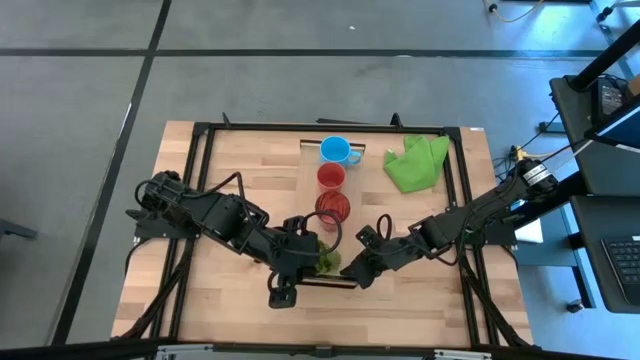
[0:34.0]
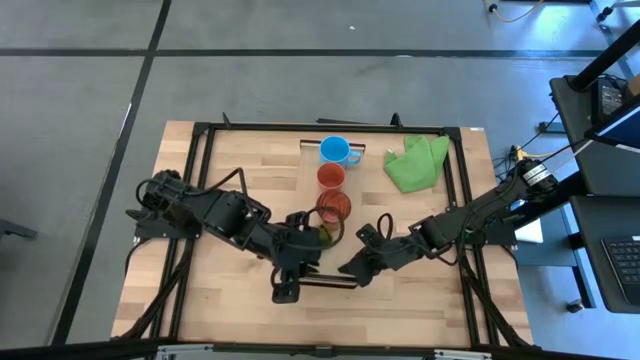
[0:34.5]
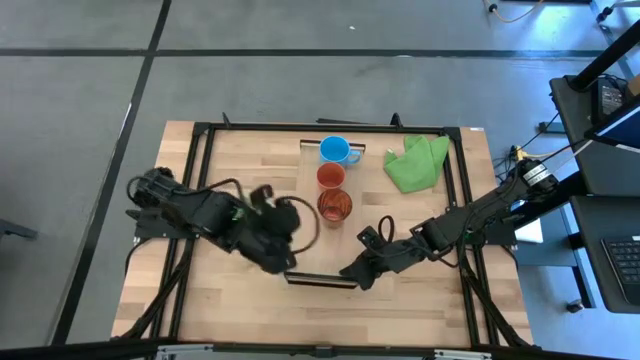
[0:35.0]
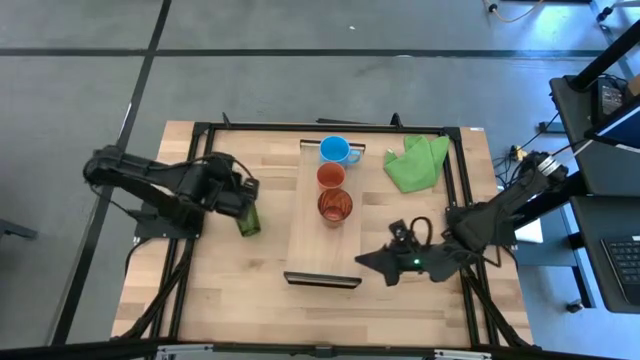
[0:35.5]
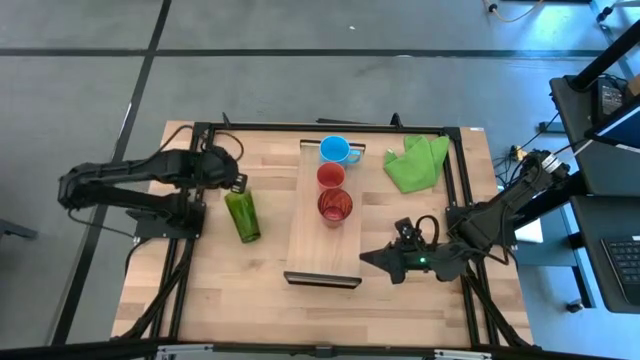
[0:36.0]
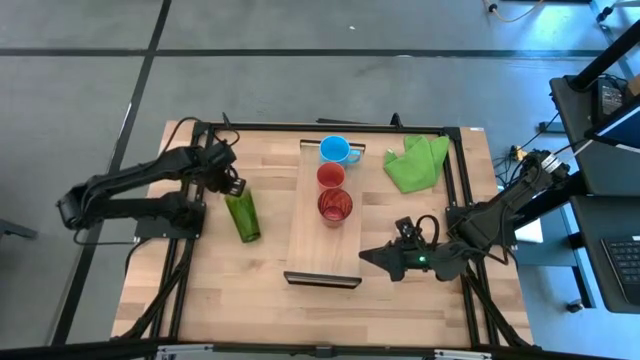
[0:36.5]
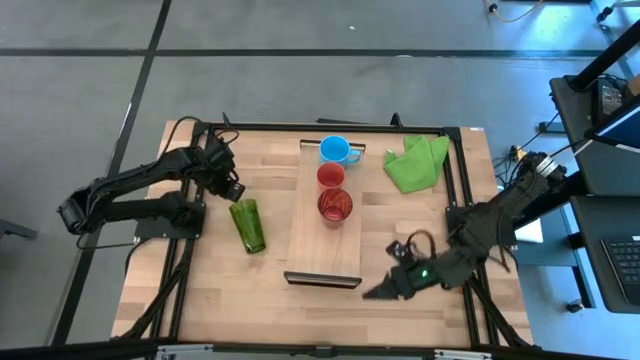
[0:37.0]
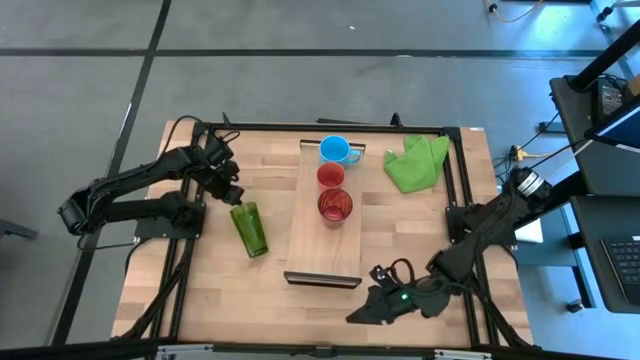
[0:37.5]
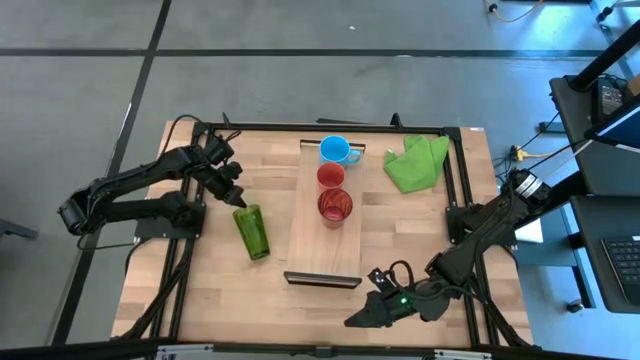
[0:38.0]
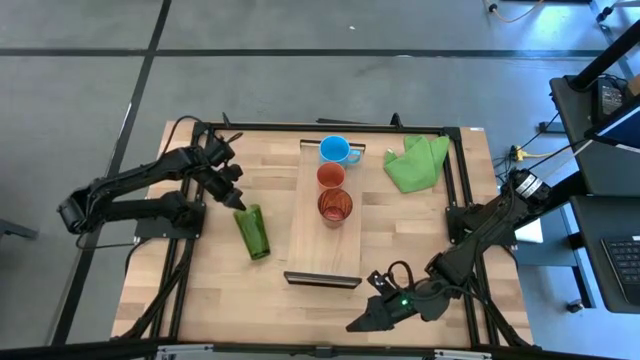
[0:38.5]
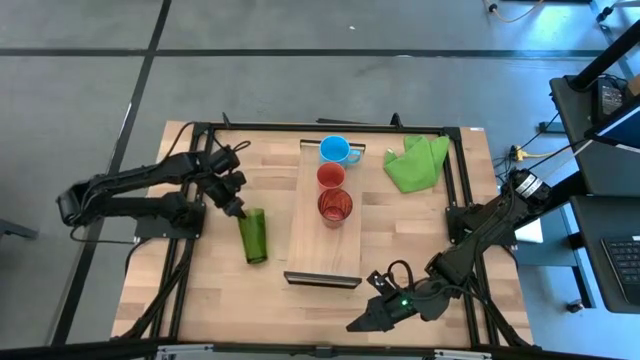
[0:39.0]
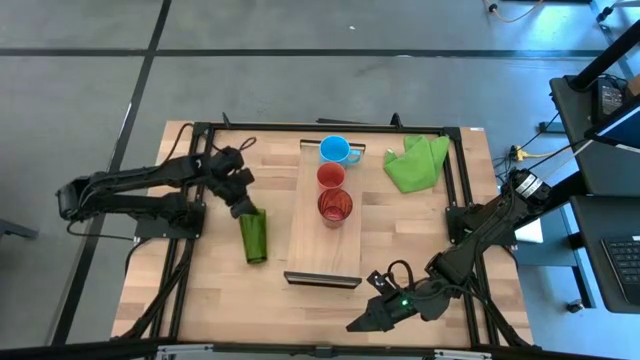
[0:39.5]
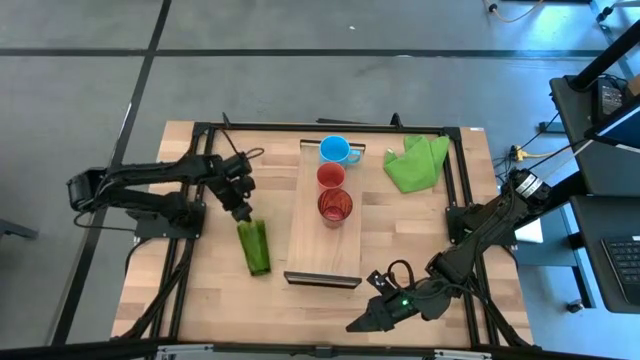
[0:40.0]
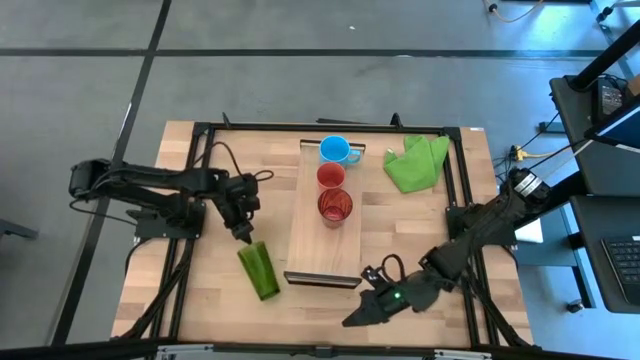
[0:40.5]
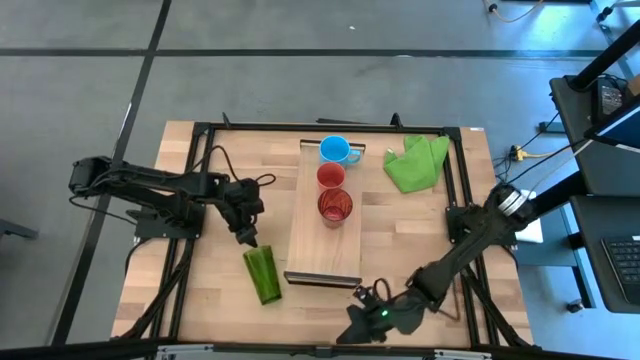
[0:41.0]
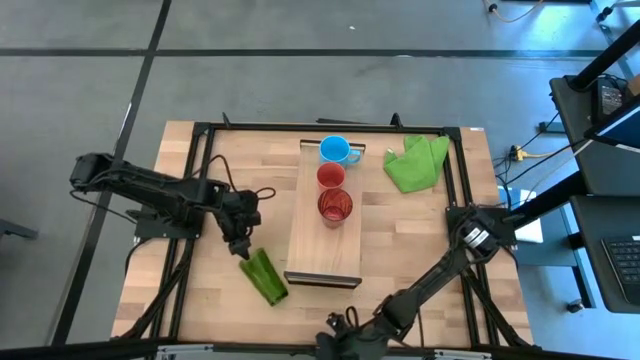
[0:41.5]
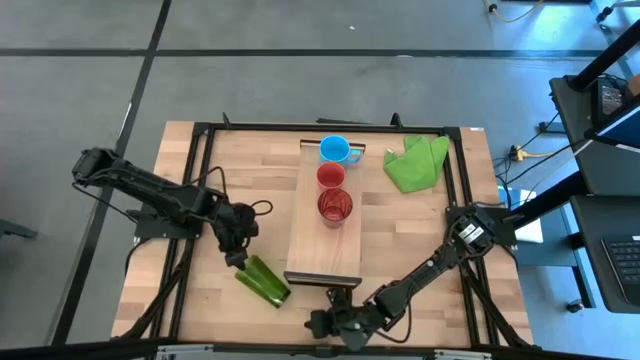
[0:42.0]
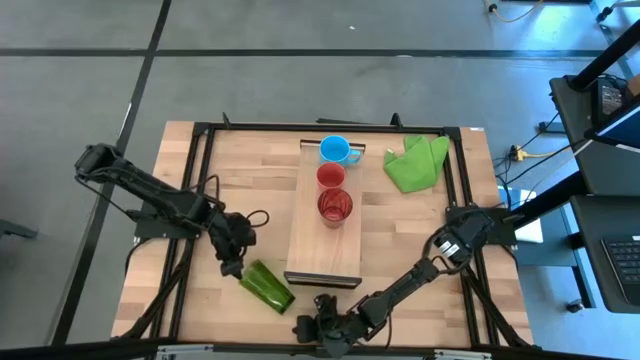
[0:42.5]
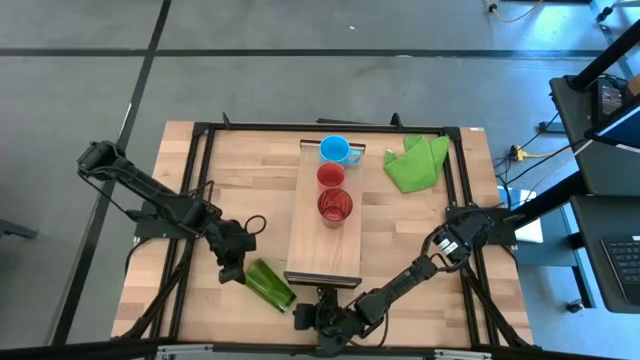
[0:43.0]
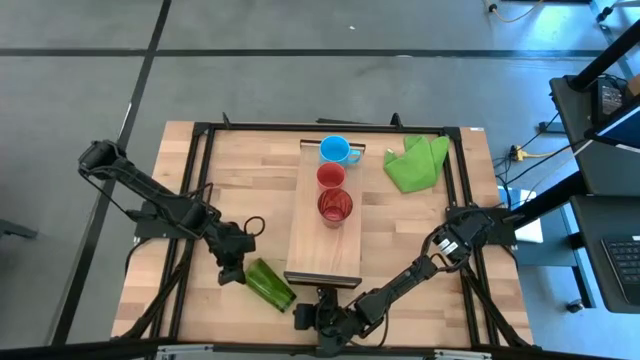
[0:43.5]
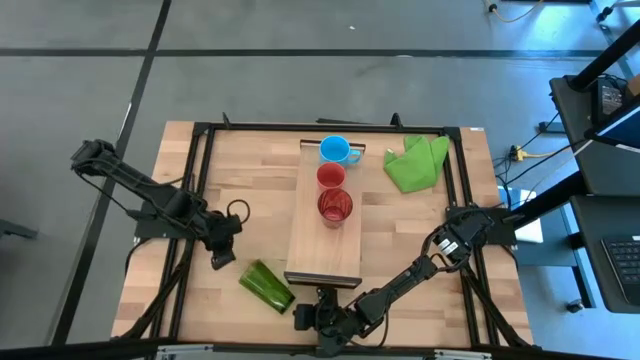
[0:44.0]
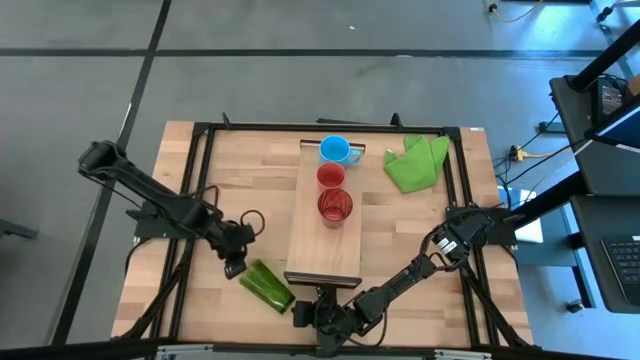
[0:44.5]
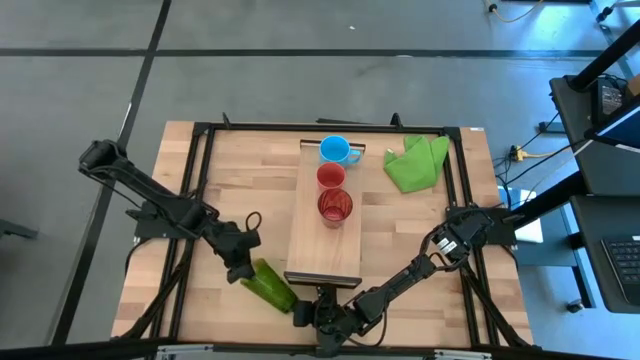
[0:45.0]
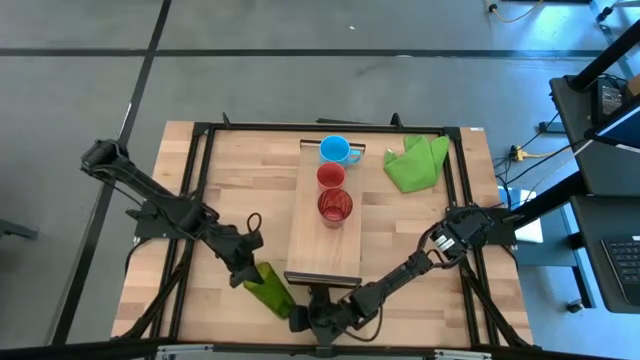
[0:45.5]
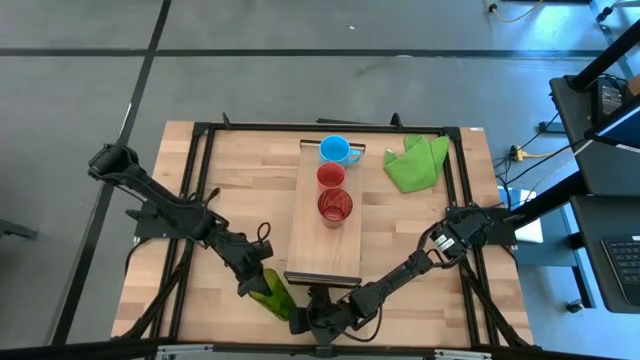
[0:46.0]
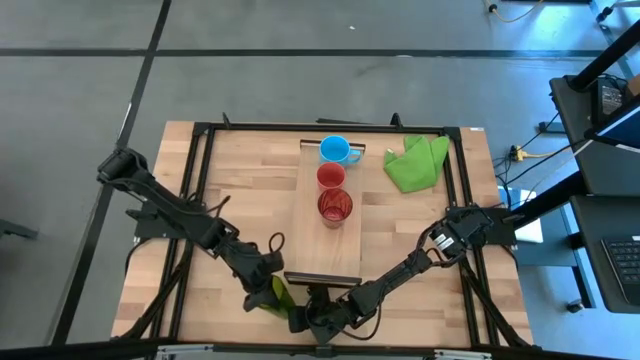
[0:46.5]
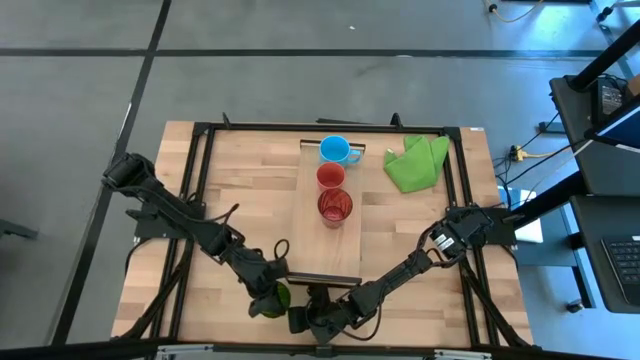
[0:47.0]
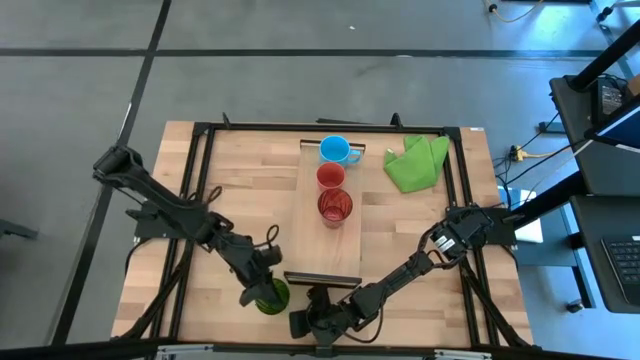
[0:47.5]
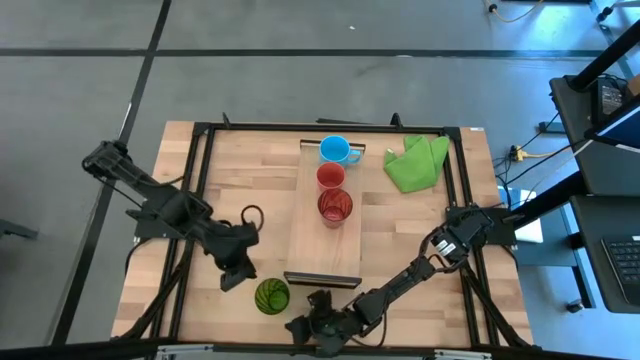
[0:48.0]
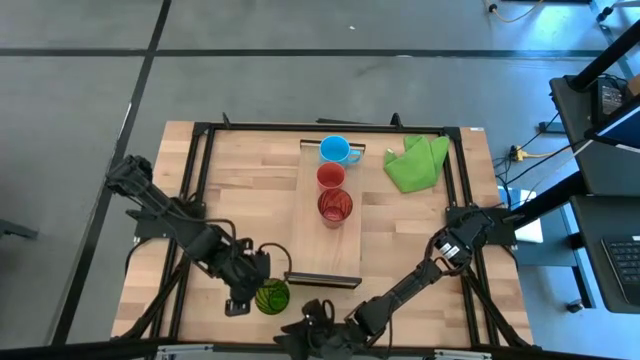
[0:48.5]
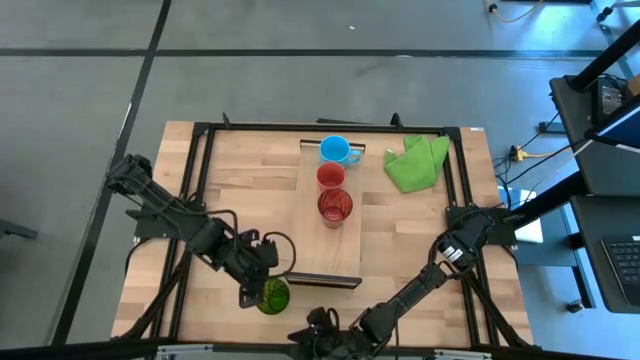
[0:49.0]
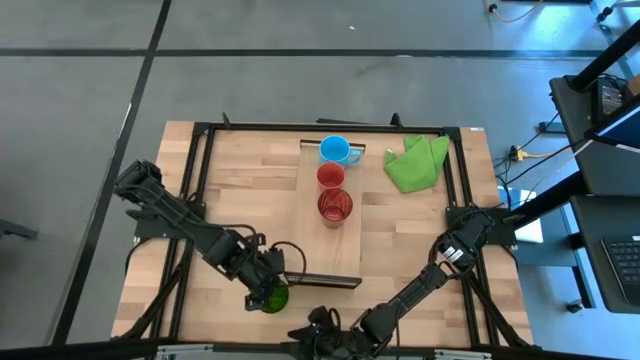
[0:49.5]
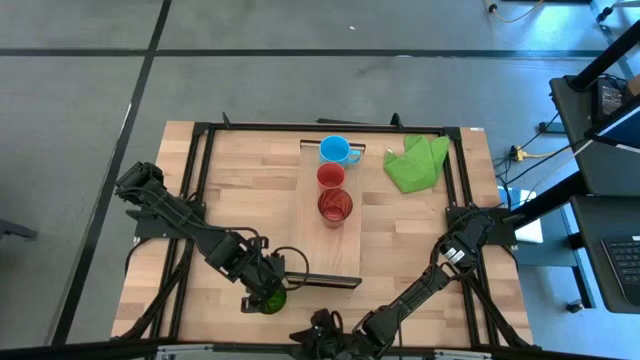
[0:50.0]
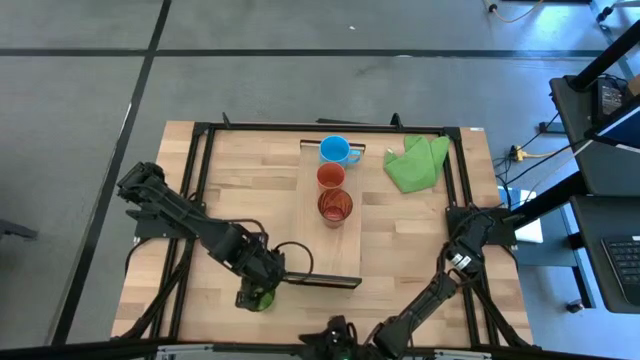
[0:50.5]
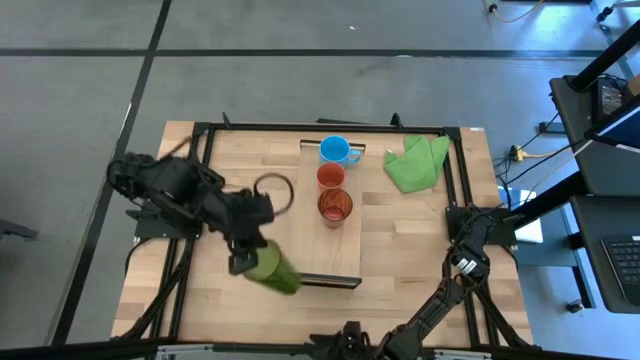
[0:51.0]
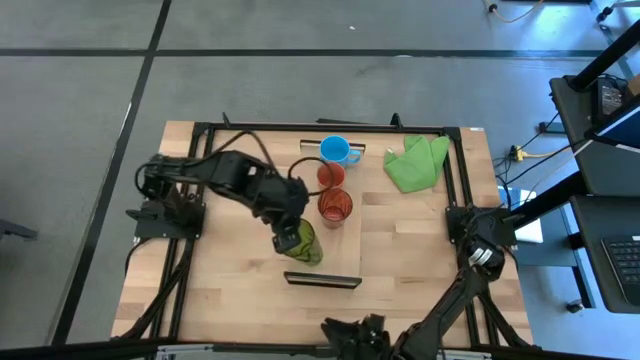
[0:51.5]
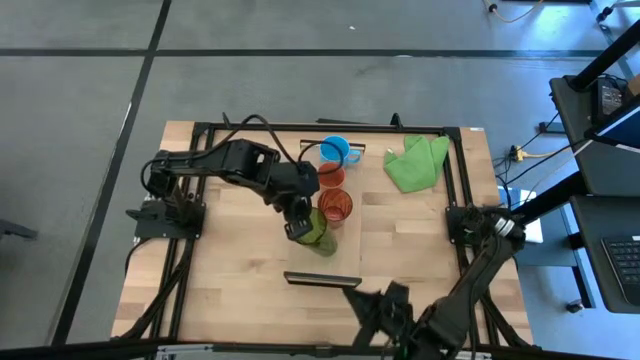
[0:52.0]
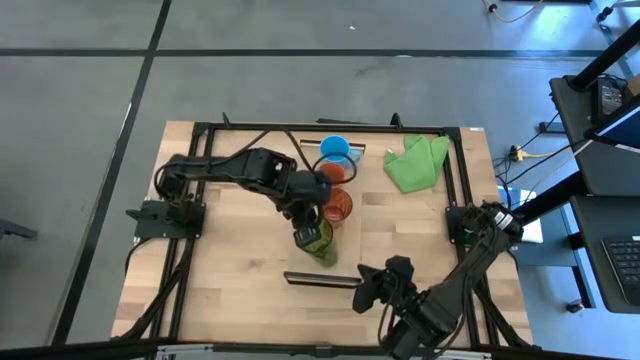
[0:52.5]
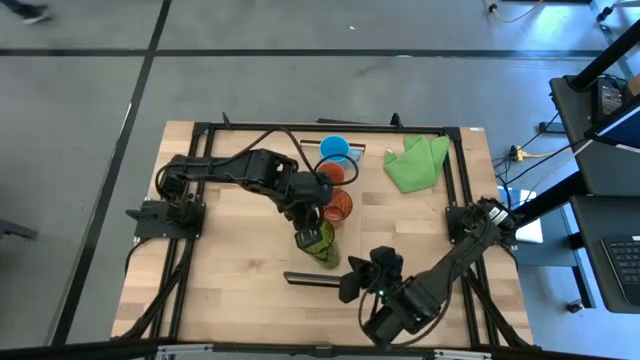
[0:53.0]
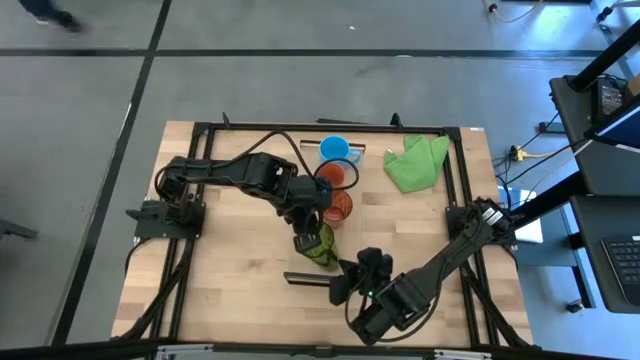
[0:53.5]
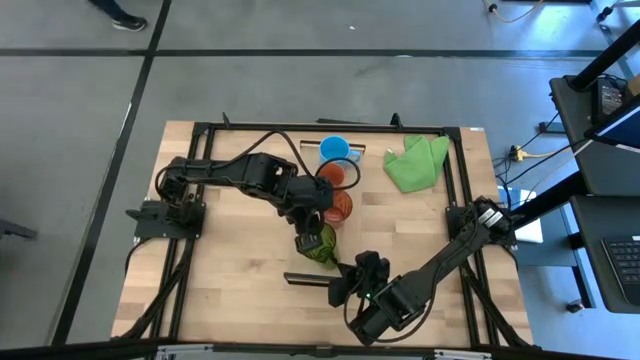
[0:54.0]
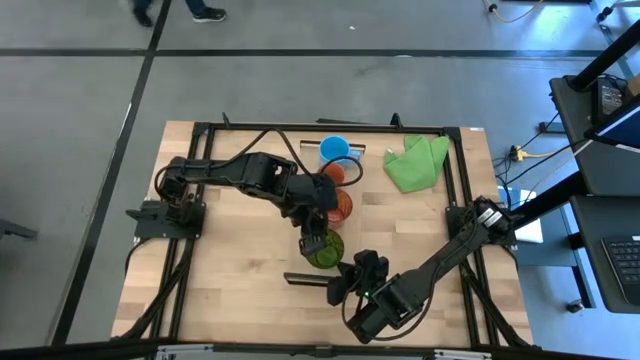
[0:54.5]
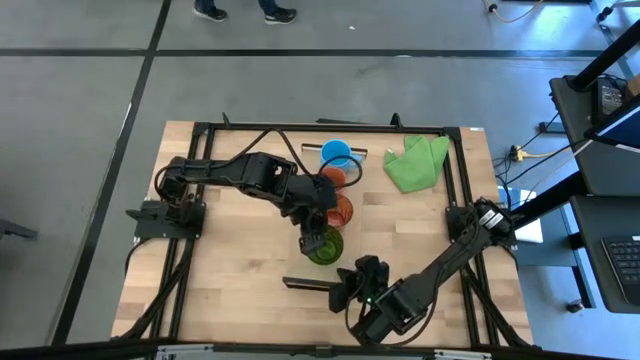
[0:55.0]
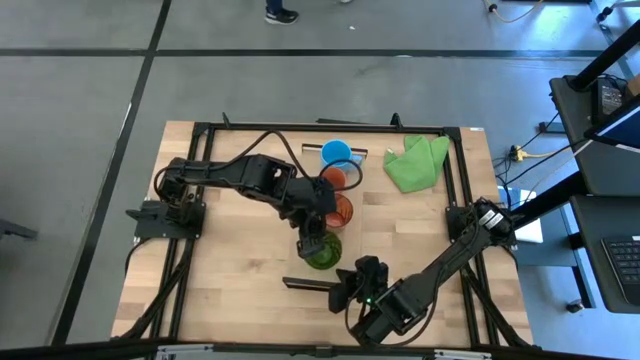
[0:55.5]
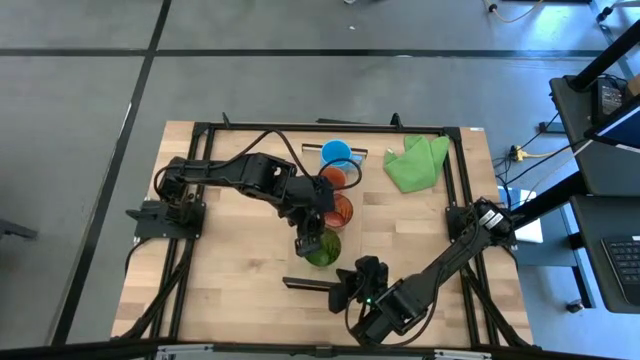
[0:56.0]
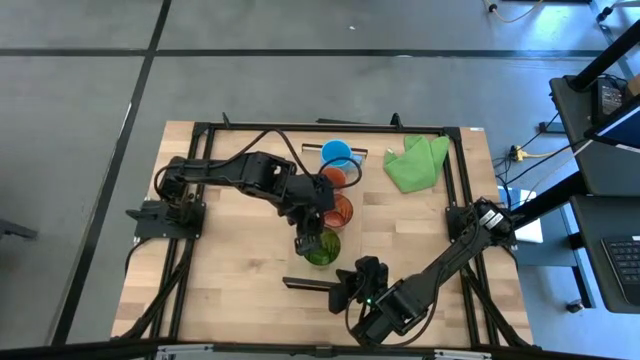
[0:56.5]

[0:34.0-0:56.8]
Task: Stack small to large cups/mugs on shelf
Put the green cup on the shelf
